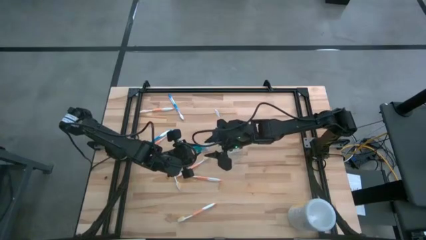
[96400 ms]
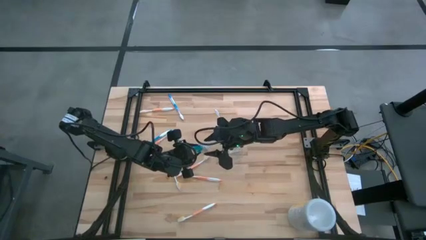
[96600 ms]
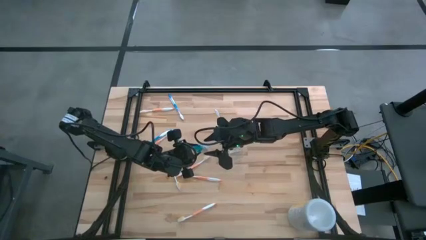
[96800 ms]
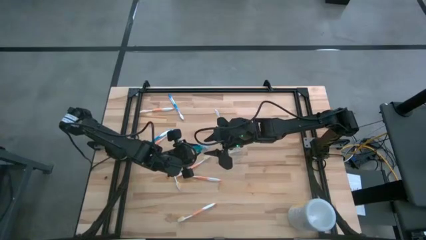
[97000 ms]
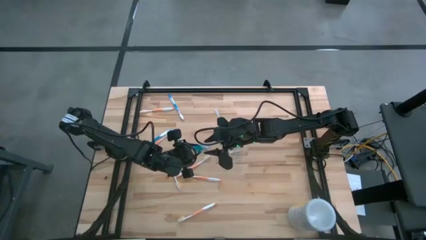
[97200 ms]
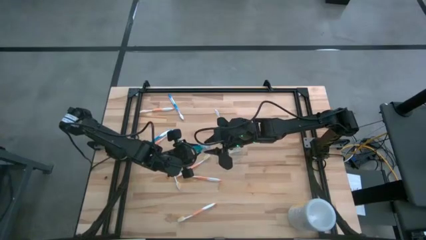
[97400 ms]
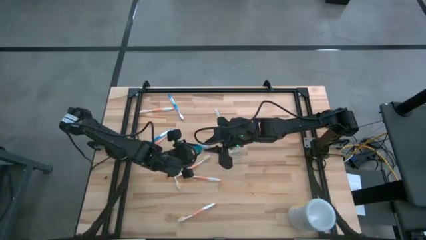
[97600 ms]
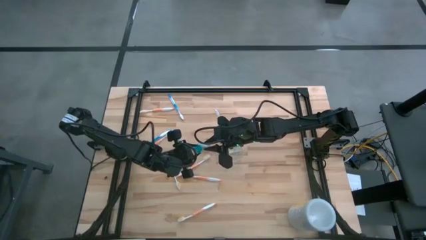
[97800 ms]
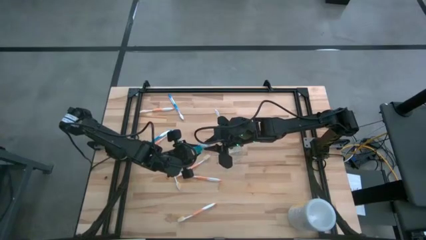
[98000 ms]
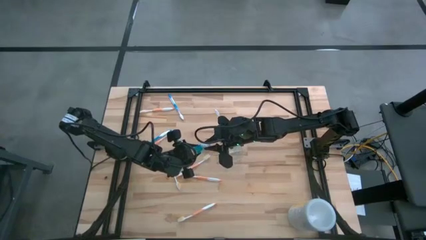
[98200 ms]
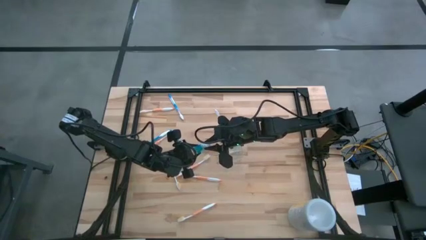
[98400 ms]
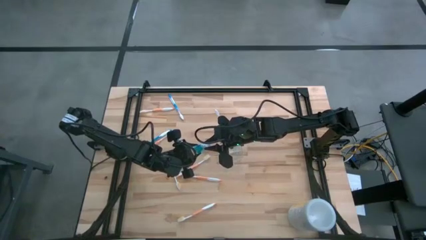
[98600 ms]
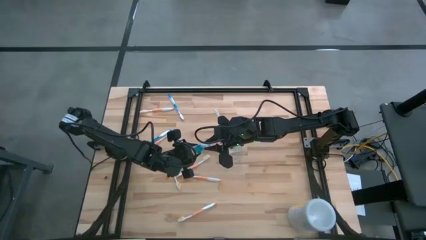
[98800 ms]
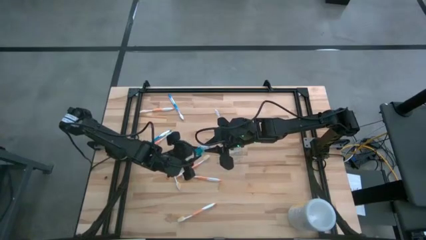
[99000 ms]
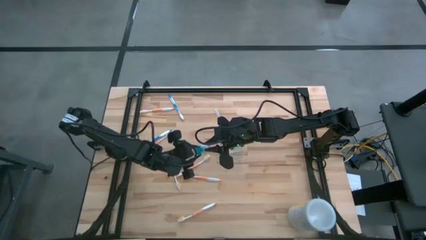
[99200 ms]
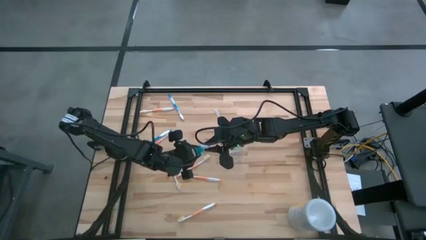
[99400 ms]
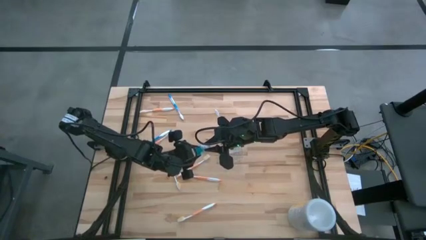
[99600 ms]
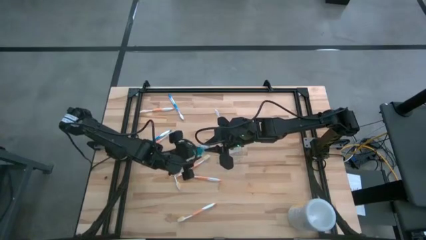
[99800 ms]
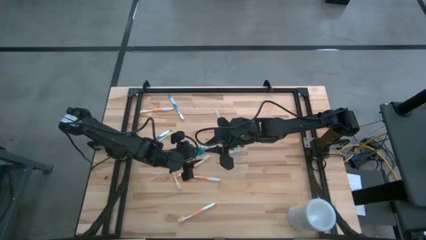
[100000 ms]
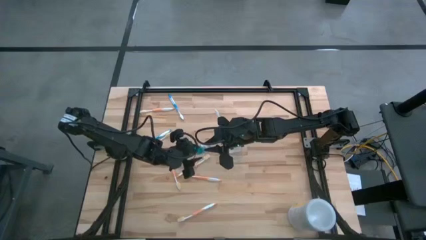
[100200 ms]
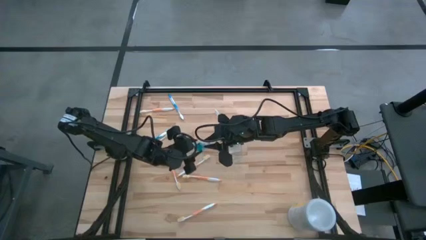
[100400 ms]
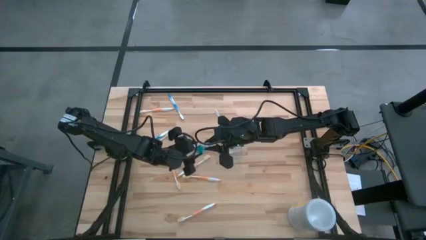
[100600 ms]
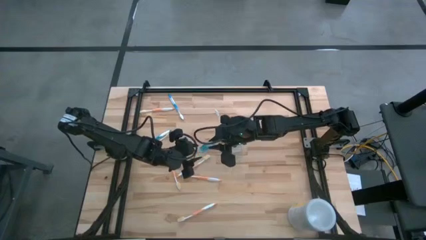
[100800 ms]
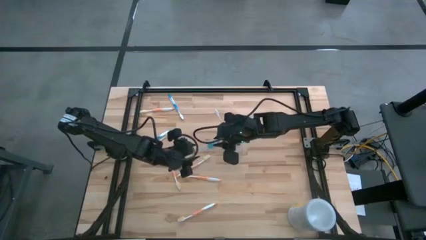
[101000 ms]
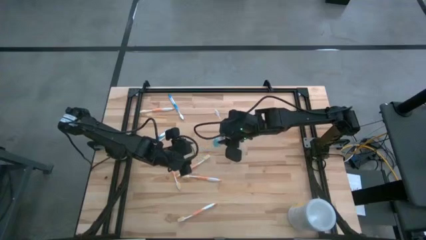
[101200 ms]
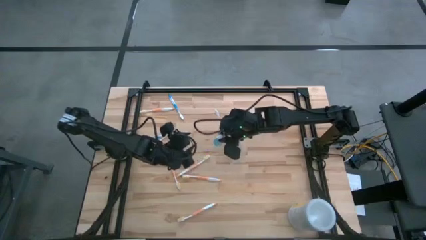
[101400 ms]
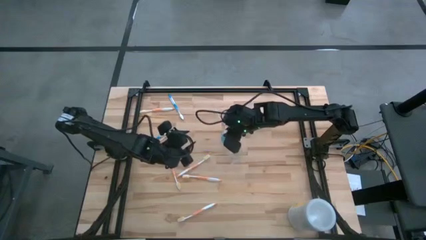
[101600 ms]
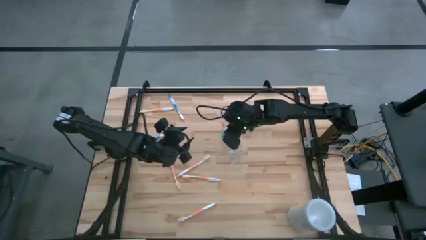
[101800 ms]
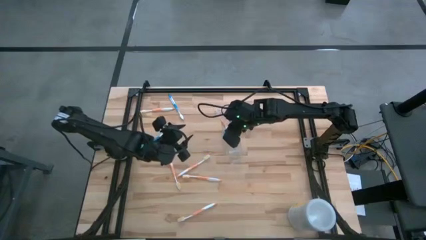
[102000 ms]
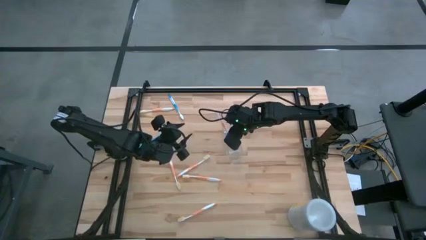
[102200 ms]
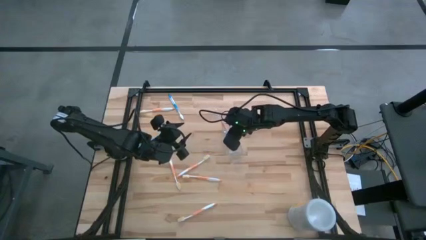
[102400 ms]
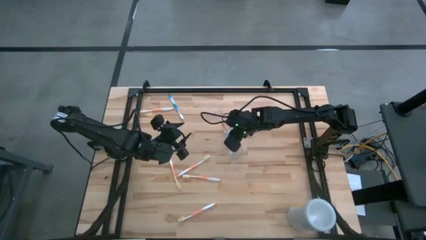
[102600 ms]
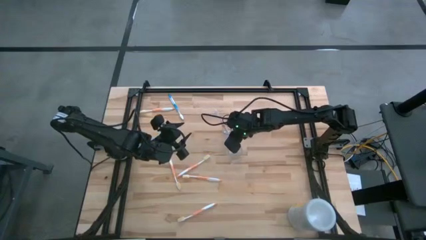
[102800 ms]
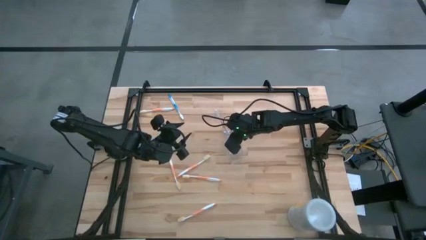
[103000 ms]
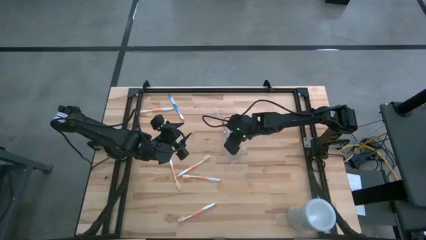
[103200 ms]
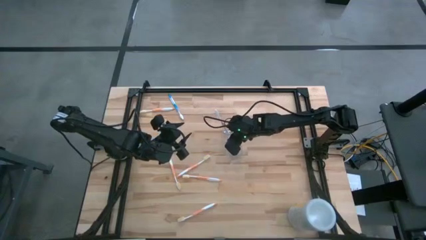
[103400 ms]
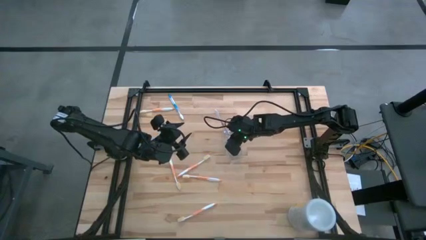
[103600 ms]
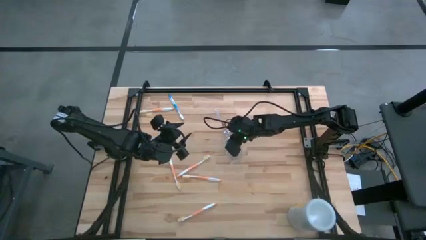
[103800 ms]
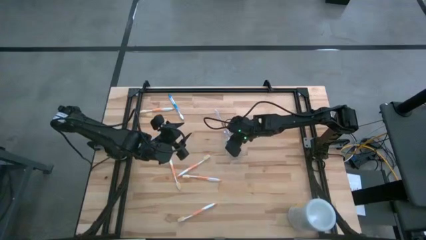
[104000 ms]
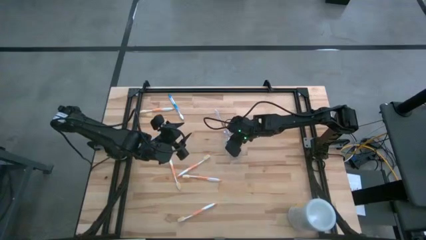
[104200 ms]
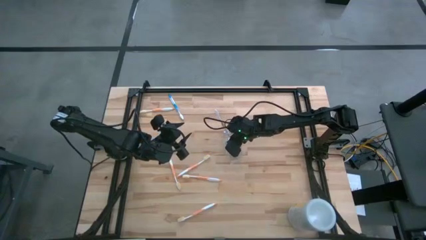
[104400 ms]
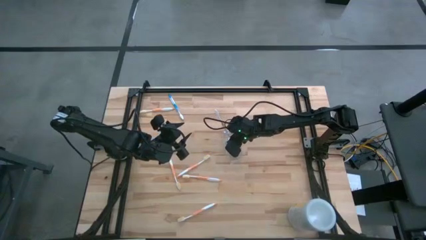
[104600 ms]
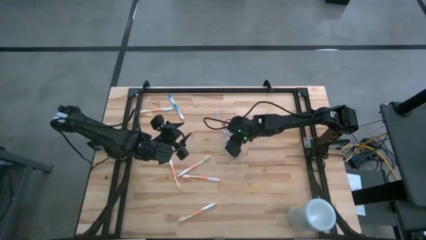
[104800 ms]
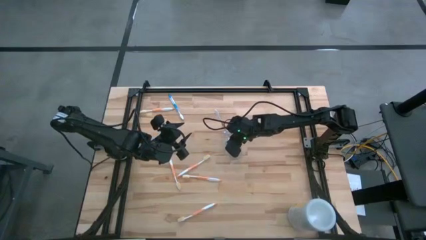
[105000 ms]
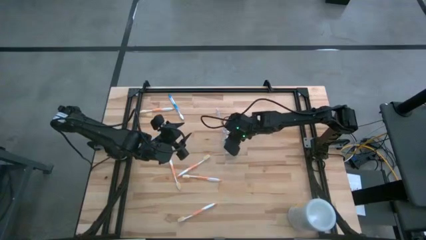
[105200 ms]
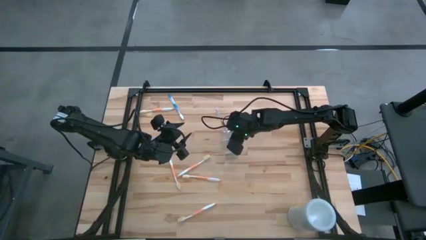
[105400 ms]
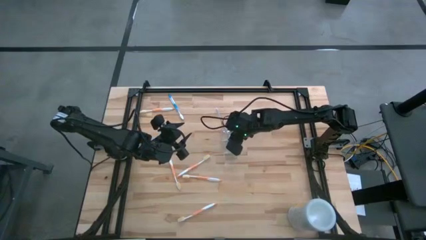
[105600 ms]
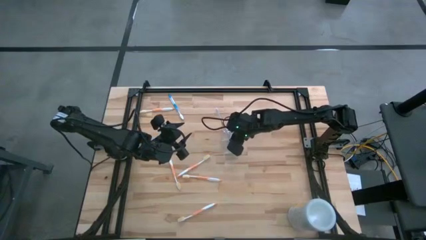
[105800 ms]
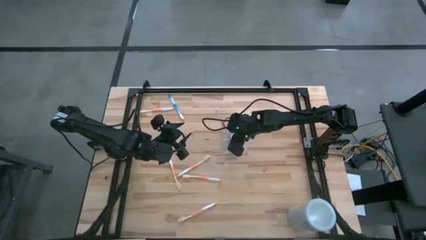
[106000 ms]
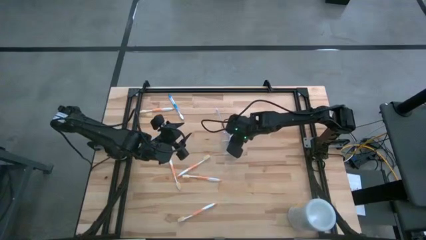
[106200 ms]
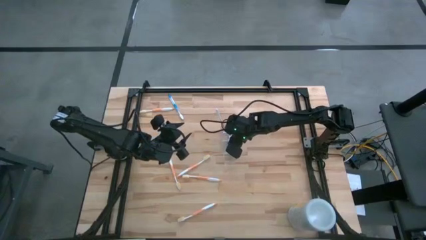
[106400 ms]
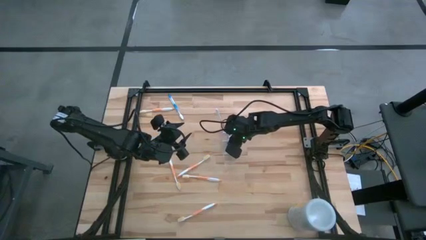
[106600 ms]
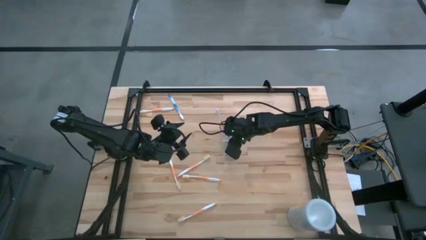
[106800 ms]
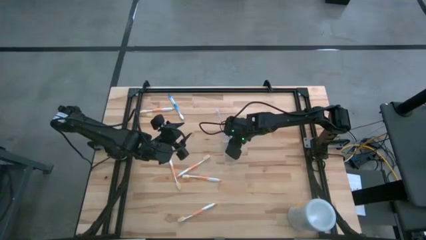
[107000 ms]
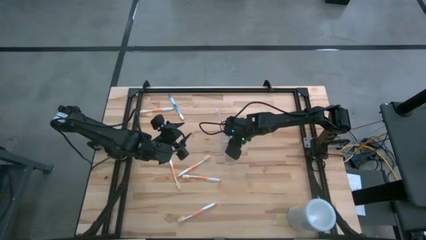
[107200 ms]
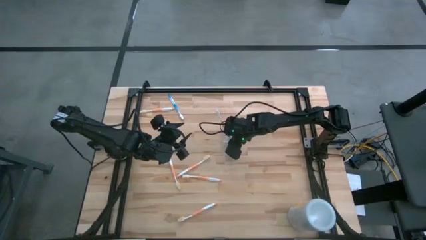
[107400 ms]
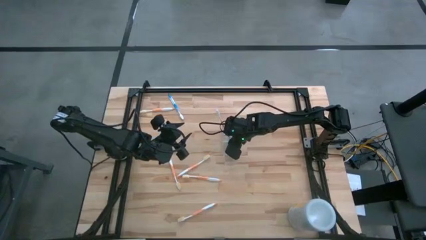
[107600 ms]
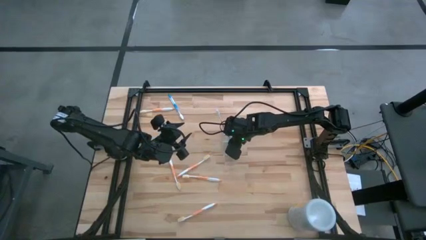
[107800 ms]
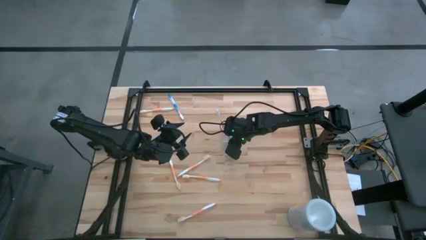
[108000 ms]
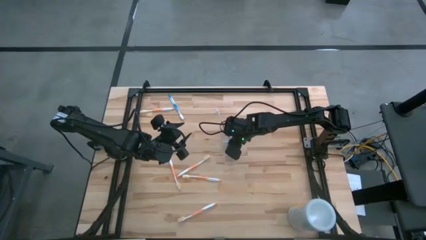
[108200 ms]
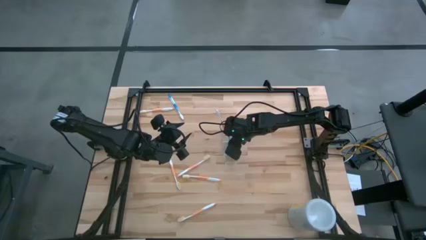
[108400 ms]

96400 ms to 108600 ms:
Task: Pick & Place toothbrushing station
Put the mouthwash into the transparent organizer

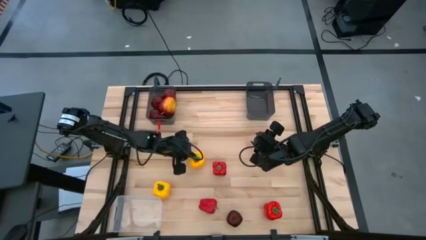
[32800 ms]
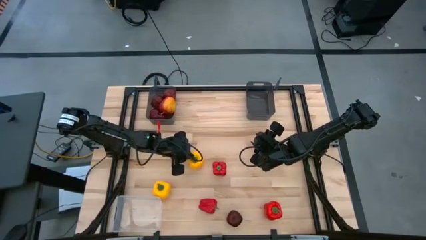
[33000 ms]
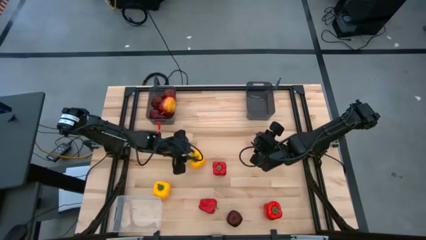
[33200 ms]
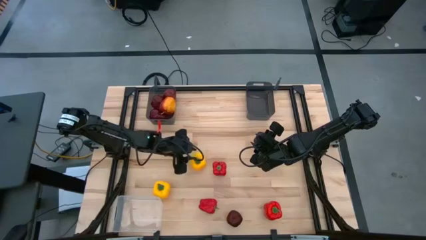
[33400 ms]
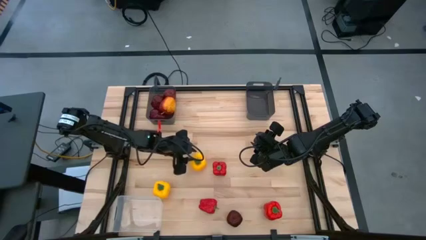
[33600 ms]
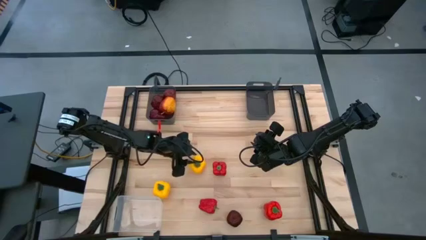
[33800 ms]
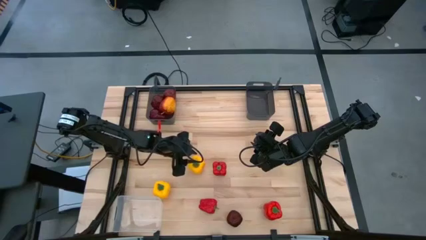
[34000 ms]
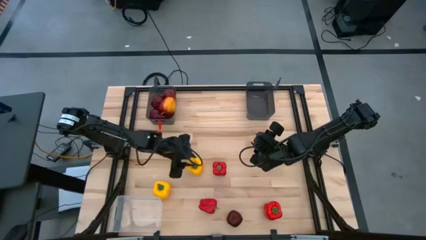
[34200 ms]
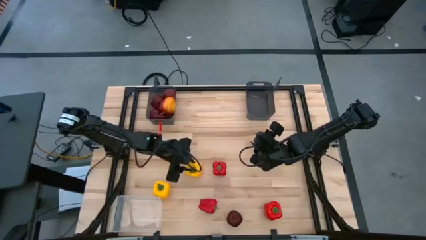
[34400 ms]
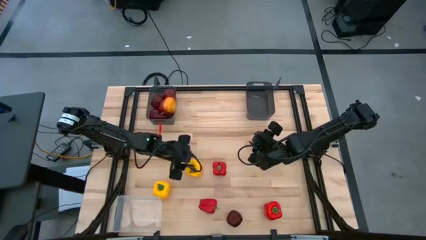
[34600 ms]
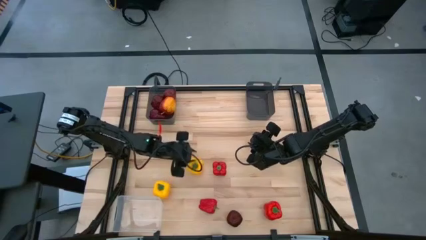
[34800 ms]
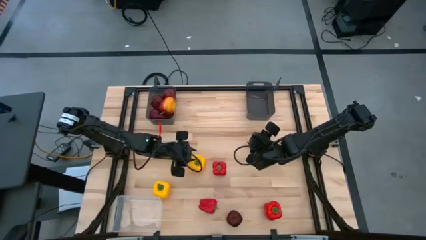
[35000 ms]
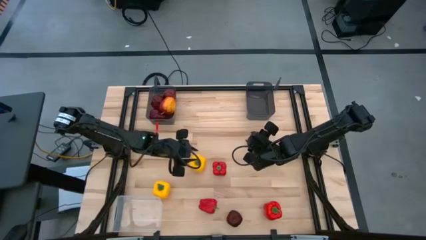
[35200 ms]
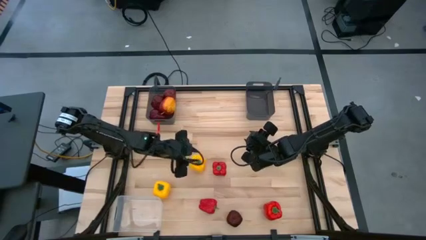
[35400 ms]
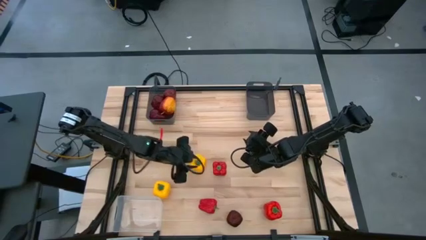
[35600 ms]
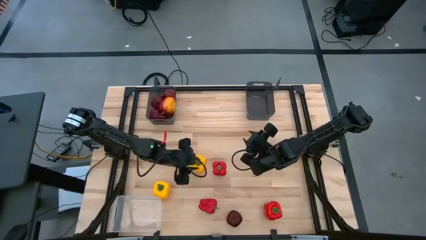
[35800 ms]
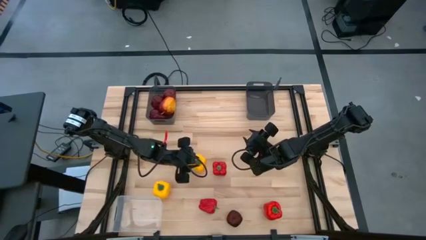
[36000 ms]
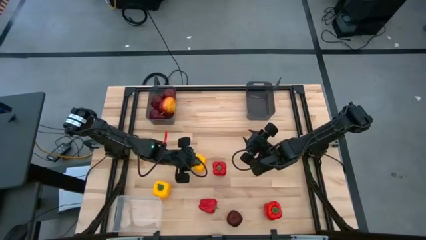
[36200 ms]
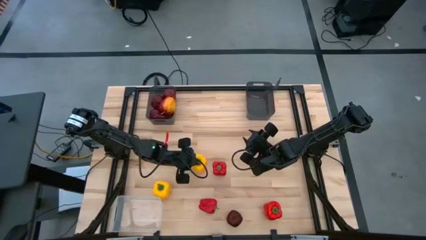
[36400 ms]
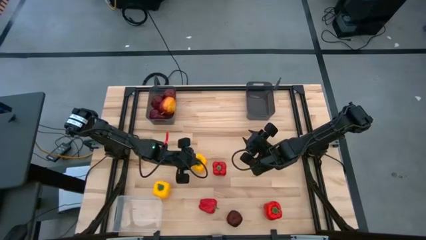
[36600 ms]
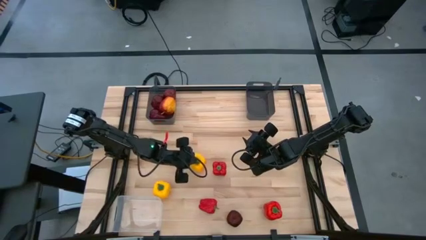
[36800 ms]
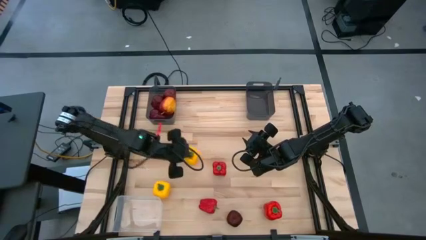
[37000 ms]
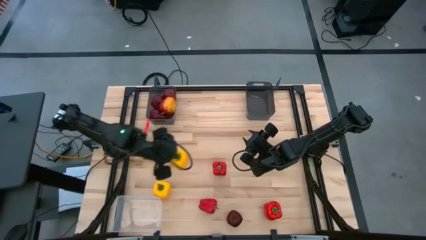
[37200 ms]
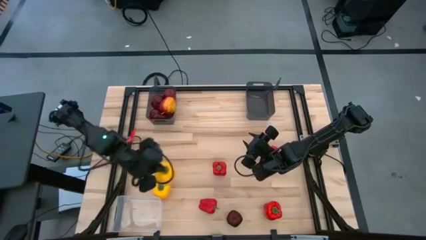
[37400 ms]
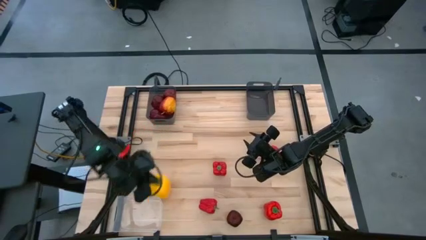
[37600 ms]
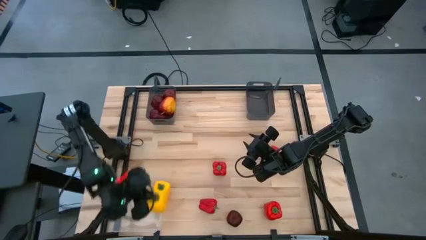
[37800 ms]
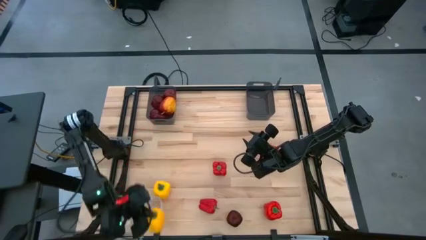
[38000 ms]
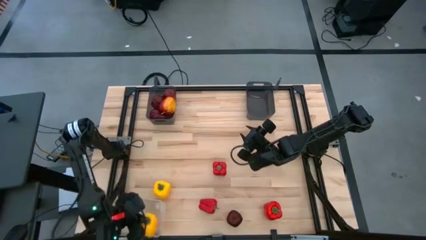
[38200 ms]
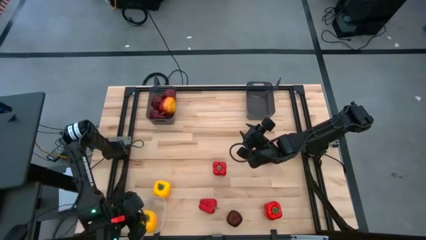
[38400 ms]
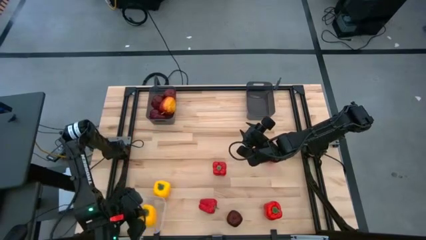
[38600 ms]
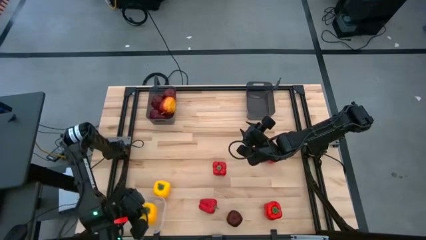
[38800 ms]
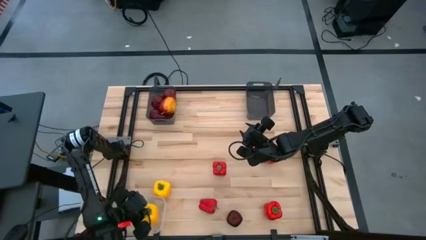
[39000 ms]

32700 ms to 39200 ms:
Task: Sort produce into baskets
Put the yellow bell pepper into the transparent bin
